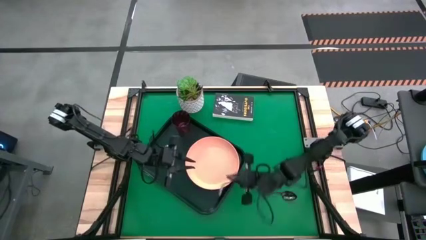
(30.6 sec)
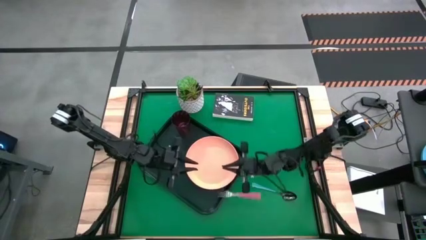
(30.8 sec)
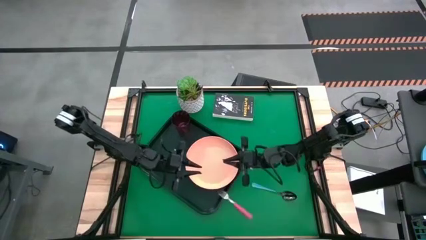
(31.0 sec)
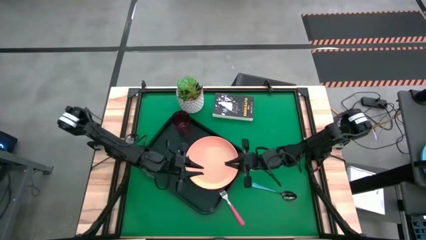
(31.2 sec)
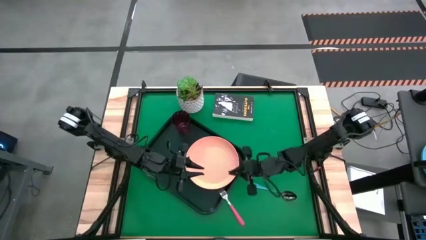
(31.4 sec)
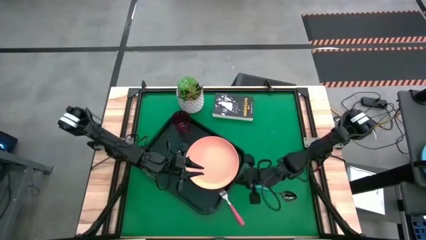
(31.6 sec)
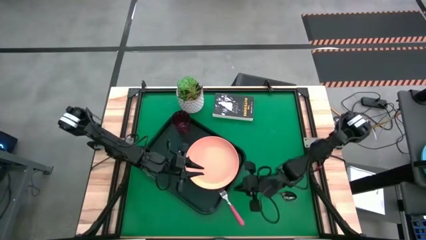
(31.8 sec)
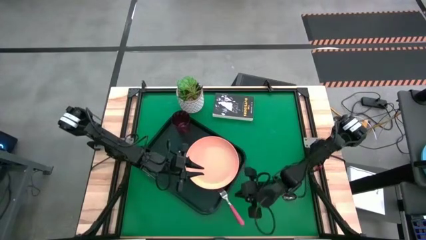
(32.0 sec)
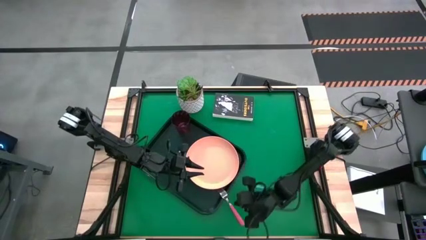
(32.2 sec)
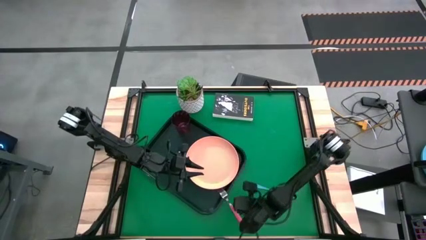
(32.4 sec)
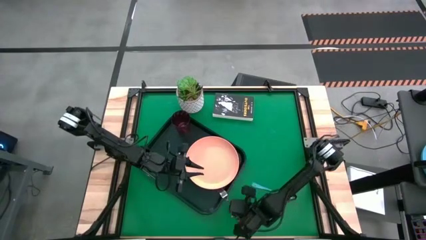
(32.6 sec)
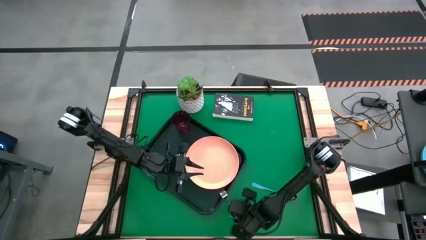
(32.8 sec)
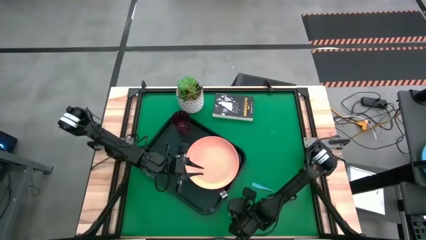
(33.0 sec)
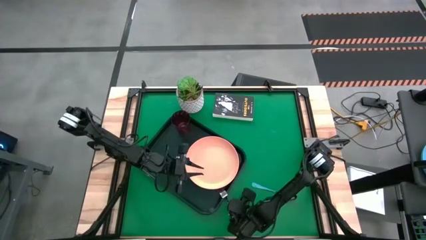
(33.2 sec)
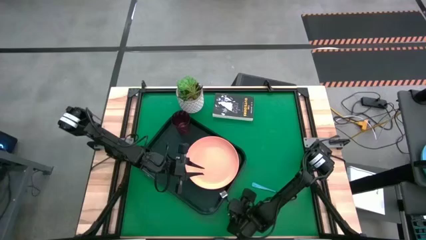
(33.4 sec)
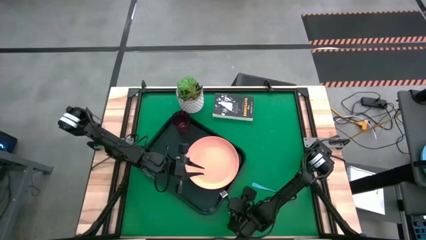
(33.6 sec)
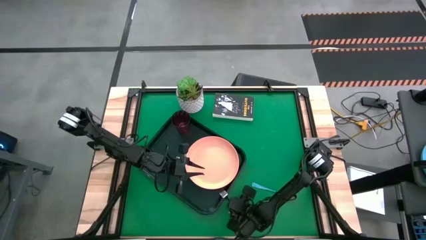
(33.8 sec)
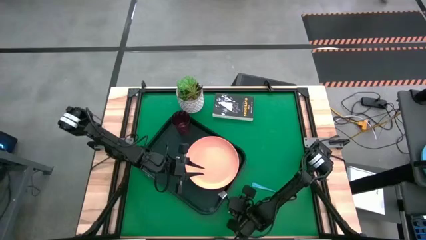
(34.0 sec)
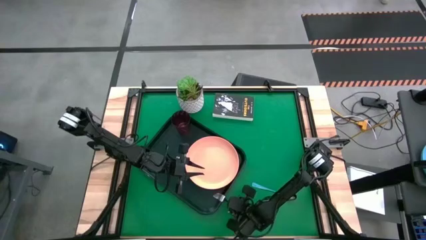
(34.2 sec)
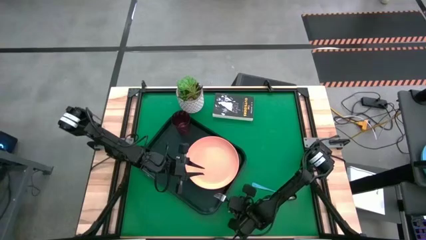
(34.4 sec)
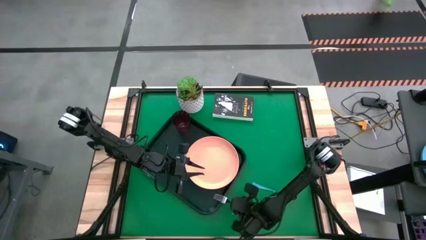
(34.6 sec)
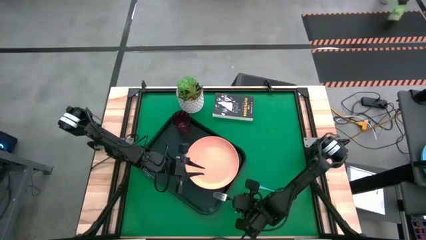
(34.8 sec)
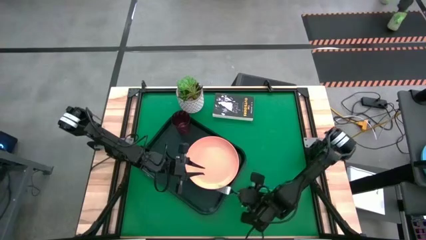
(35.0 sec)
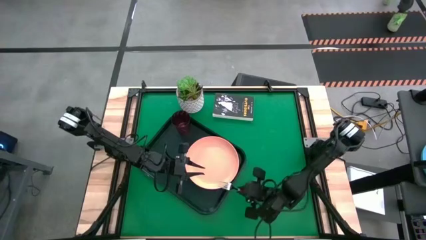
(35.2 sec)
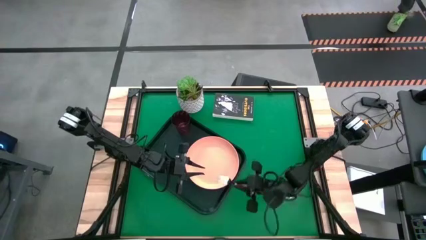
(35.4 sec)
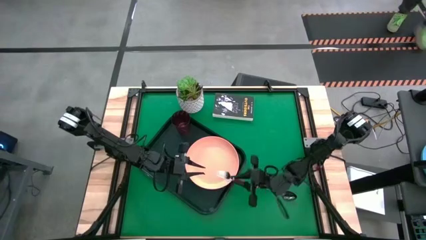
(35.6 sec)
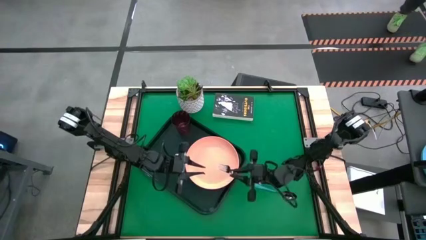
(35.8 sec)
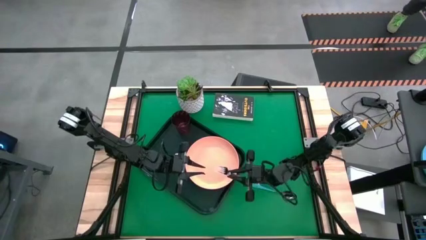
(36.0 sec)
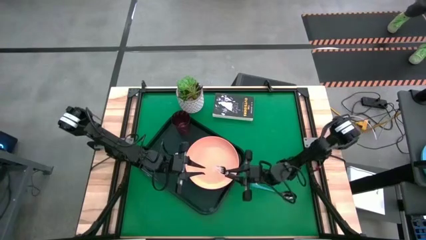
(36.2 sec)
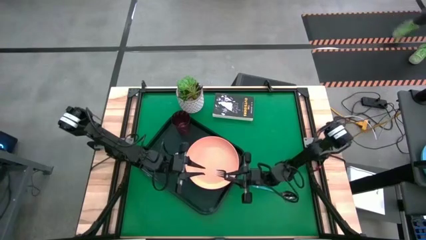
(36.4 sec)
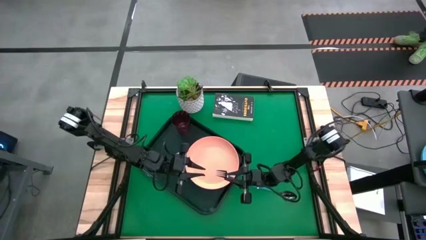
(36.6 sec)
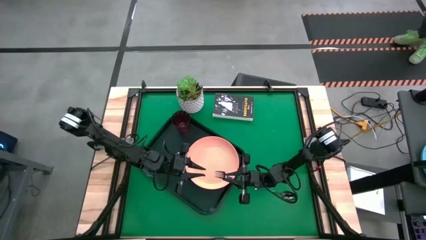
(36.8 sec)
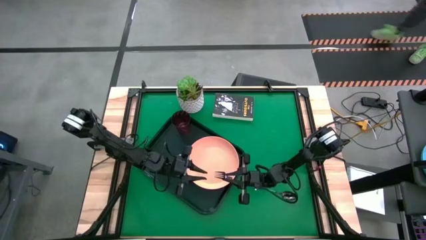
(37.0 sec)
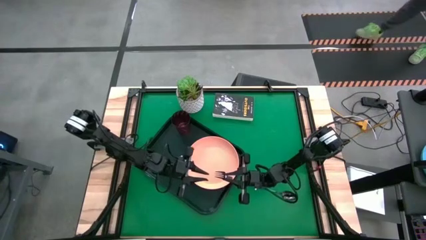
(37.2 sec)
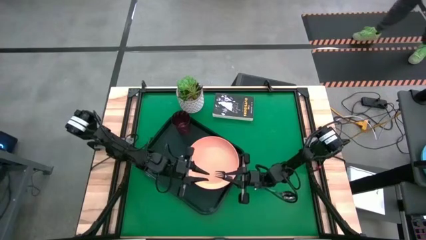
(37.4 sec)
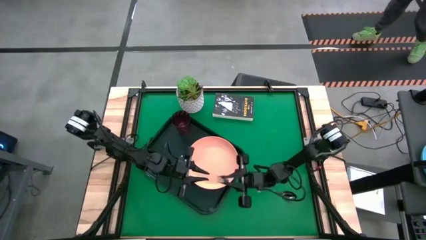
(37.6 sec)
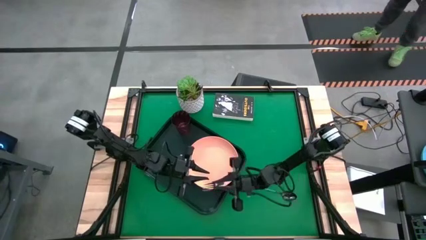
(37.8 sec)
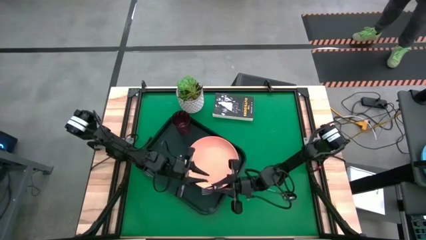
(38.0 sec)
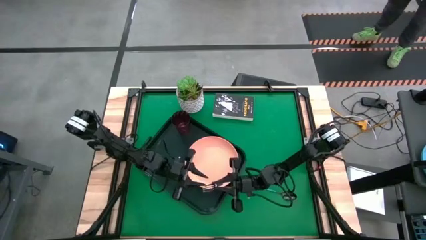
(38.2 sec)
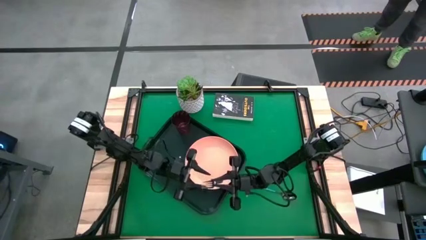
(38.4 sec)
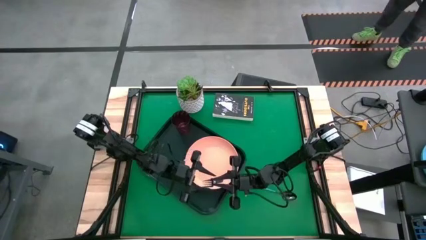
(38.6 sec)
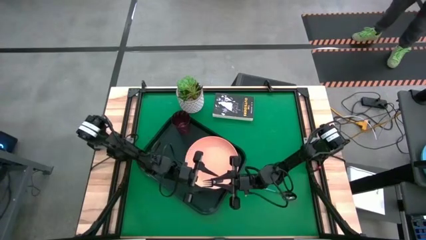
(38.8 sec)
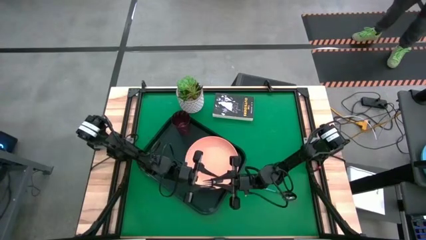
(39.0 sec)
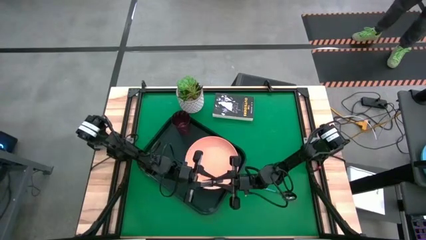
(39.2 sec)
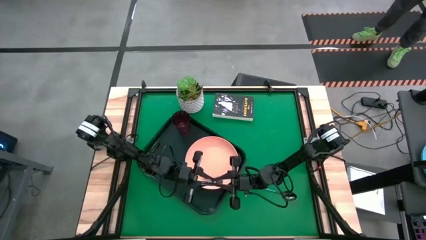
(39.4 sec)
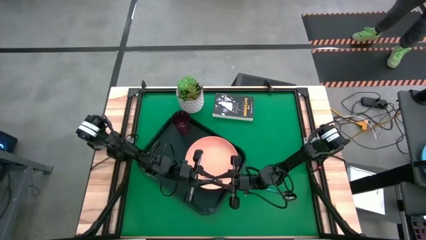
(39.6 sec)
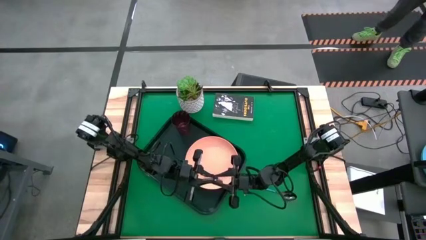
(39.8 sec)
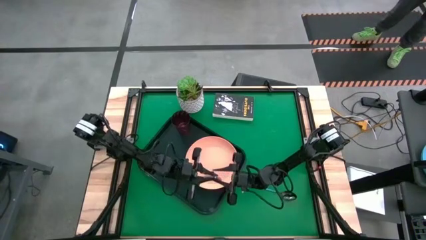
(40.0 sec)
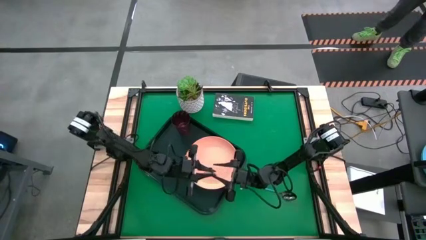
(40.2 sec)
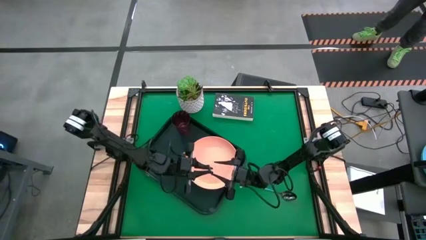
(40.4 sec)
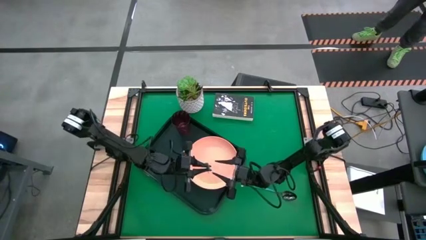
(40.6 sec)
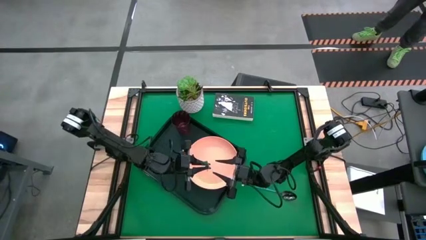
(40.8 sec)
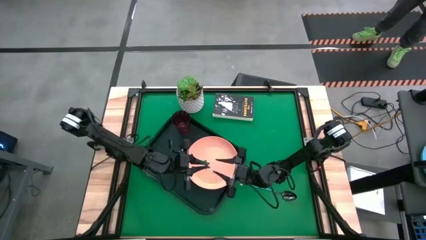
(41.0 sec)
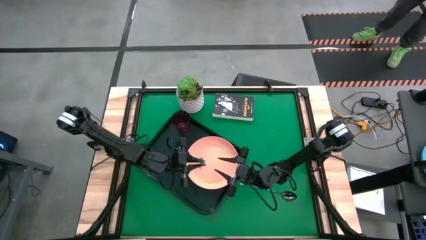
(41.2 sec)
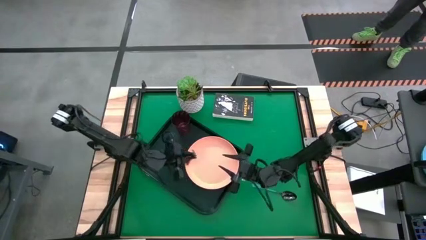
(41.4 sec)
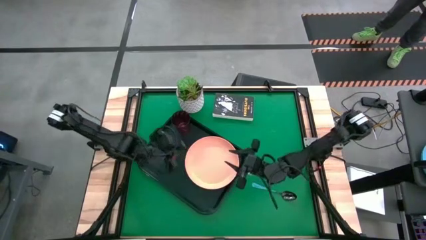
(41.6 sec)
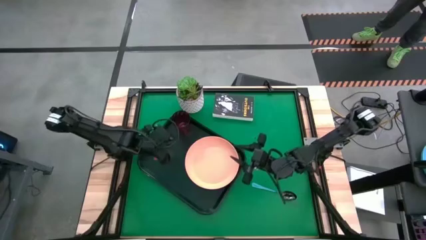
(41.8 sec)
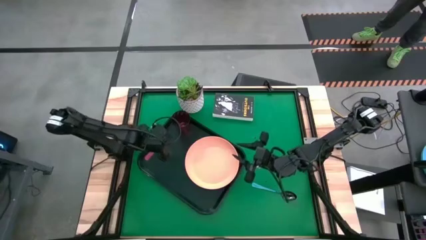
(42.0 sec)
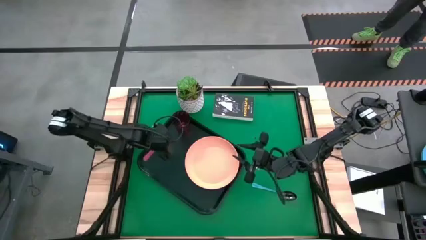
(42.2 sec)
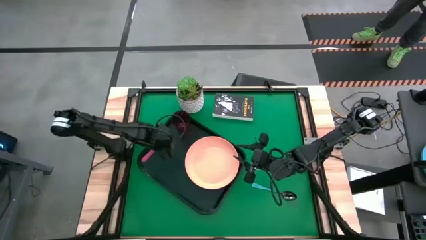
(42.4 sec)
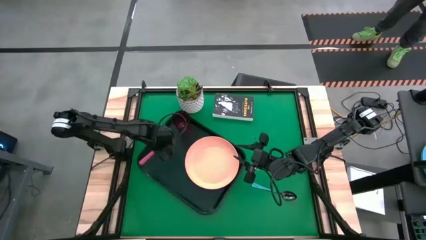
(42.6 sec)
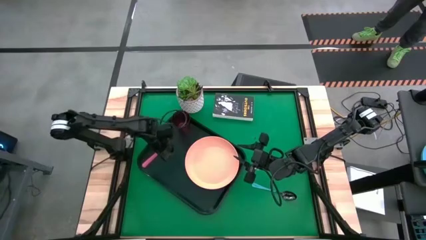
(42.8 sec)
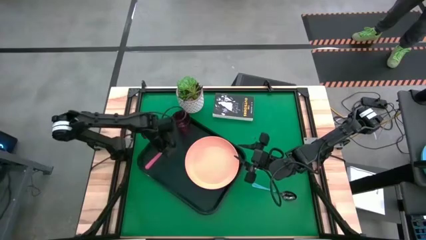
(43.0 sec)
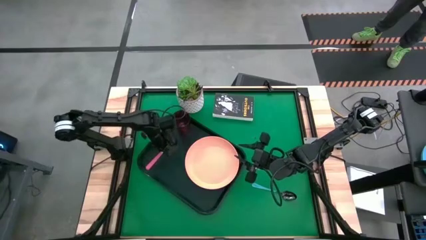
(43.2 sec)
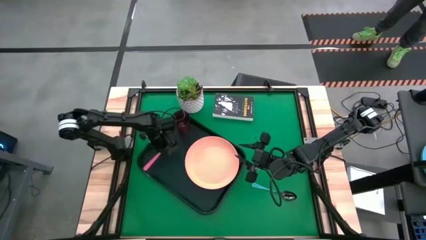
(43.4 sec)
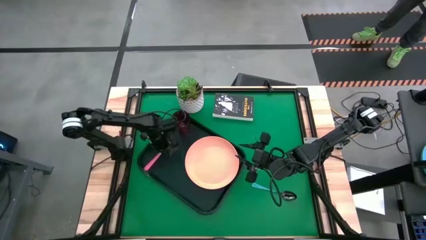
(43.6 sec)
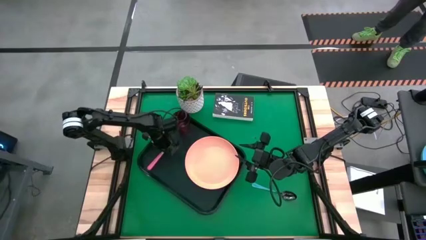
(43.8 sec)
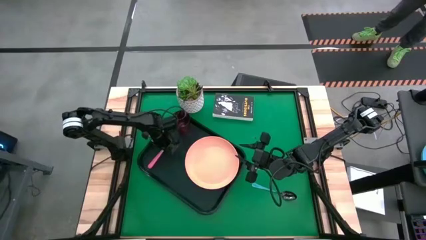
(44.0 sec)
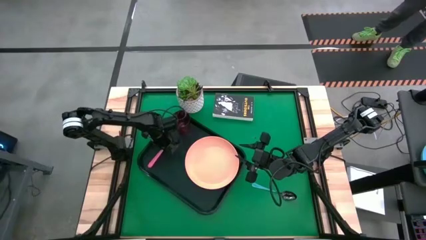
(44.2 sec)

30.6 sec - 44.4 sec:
Task: Pick and place plate/cup/fork/spoon on tray
Put the pink fork on the black tray to the bottom of the red cup

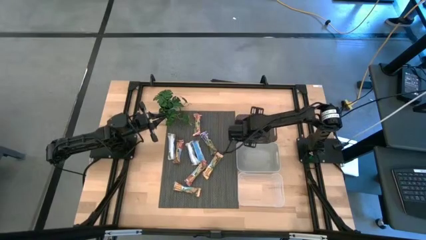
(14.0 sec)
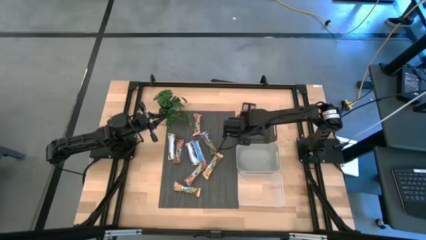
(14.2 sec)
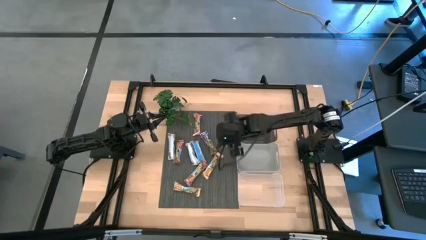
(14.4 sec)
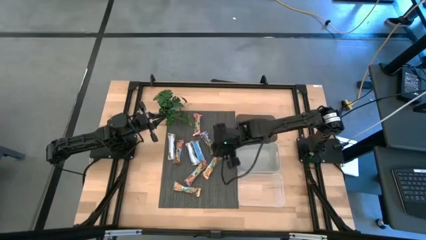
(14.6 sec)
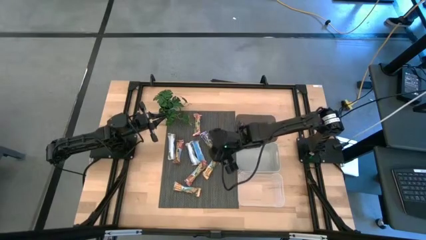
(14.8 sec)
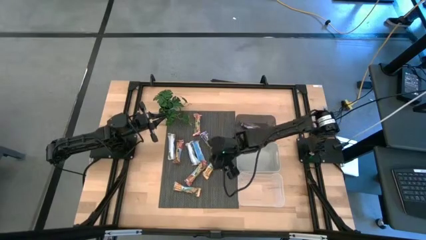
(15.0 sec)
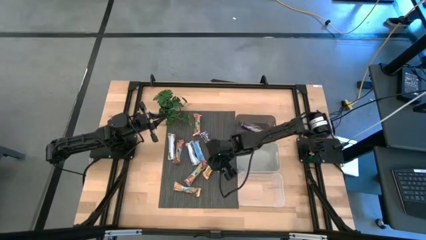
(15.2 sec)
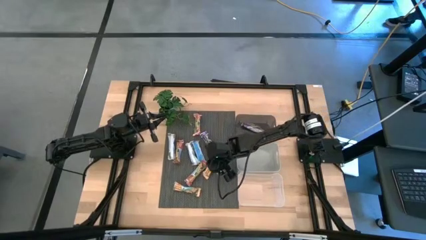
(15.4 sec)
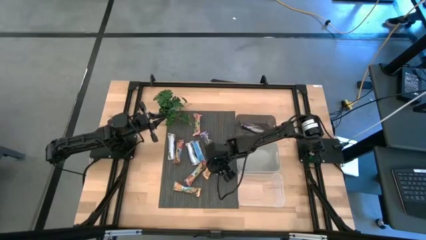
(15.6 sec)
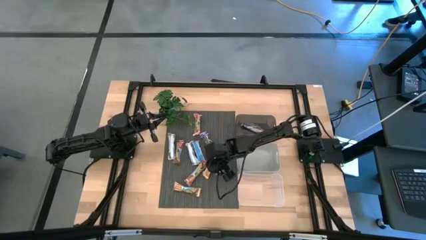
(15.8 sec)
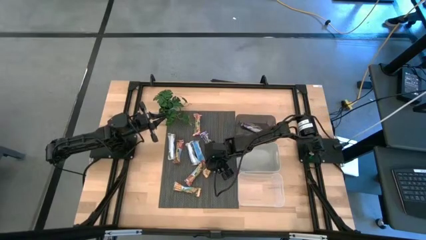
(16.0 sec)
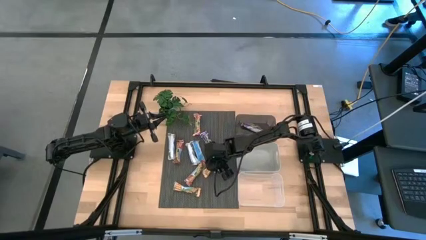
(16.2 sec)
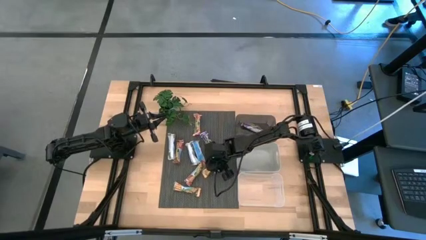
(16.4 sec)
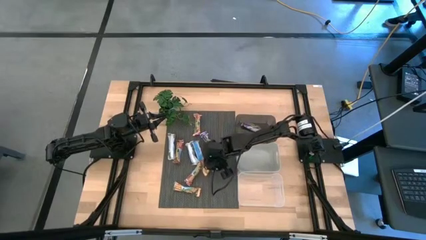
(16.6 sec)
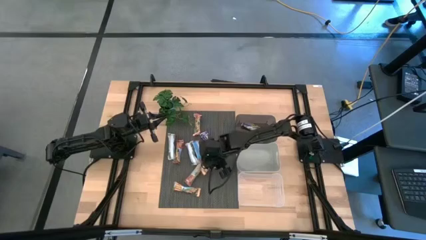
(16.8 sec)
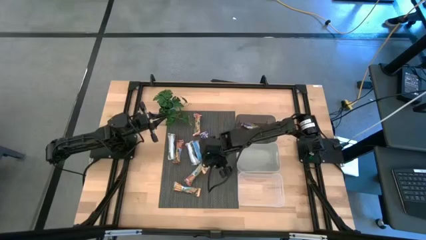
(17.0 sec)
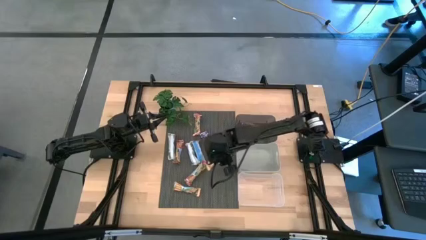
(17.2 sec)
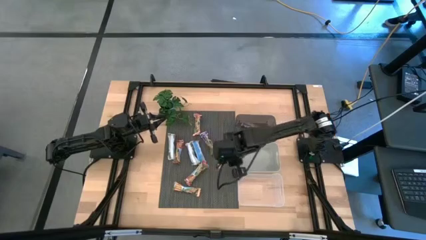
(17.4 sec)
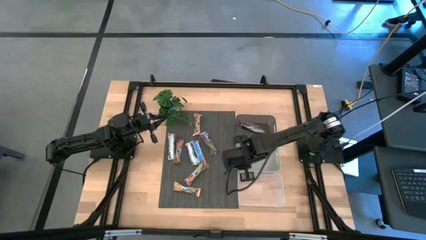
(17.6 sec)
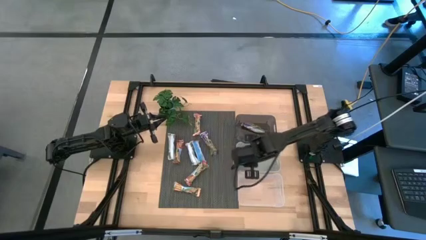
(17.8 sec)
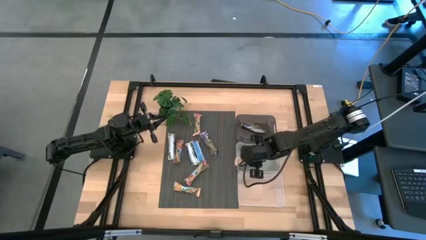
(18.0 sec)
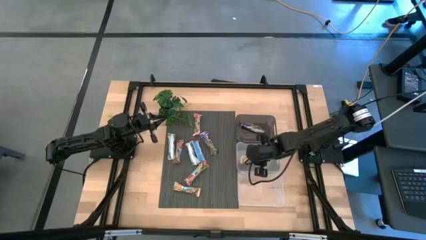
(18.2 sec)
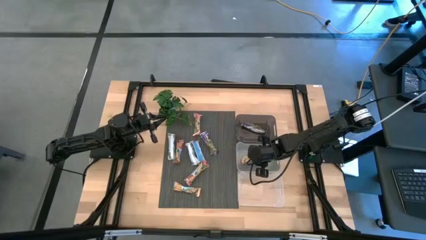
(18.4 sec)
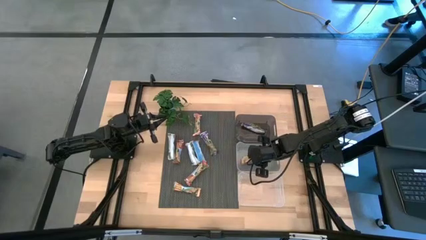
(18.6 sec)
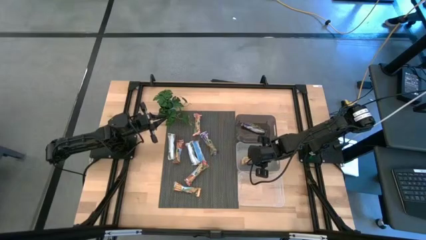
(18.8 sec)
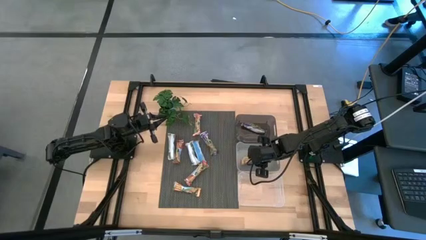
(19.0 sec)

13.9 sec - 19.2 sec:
Task: Pick and place Granola Bars by type
Put the yellow granola bar into the gray bin
